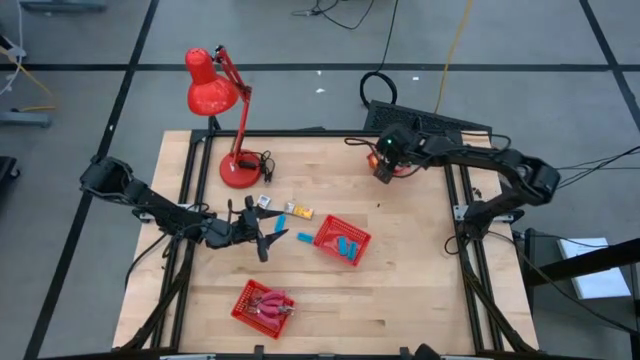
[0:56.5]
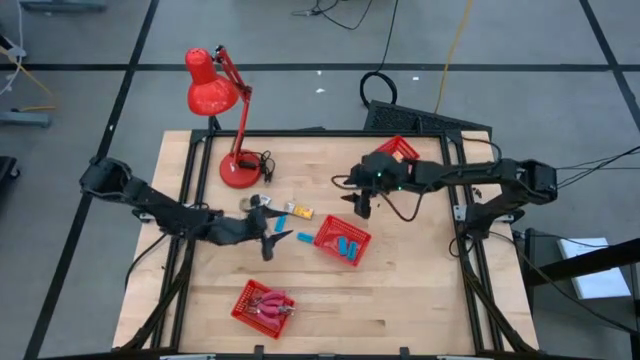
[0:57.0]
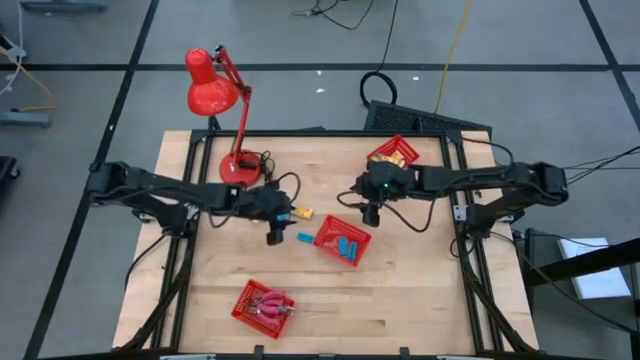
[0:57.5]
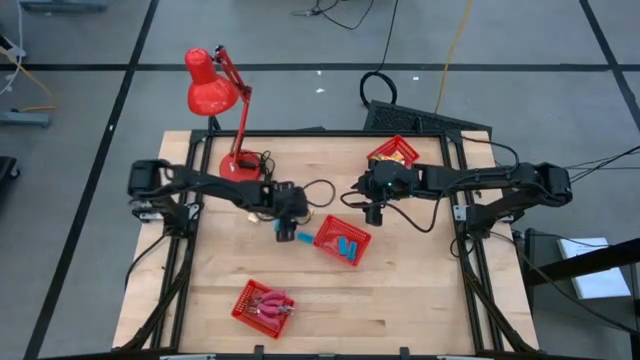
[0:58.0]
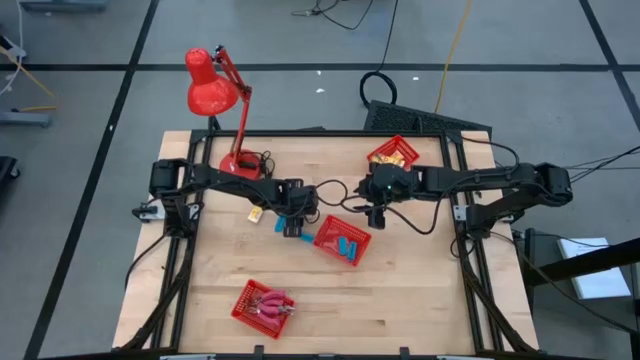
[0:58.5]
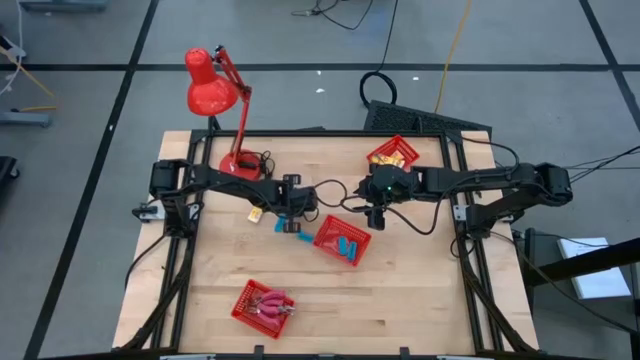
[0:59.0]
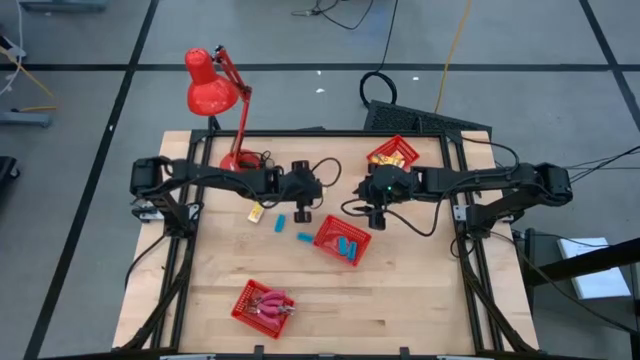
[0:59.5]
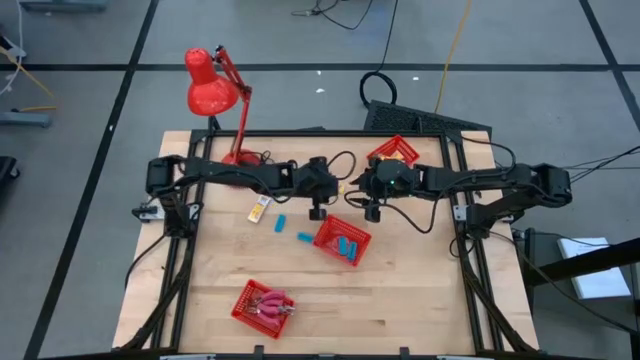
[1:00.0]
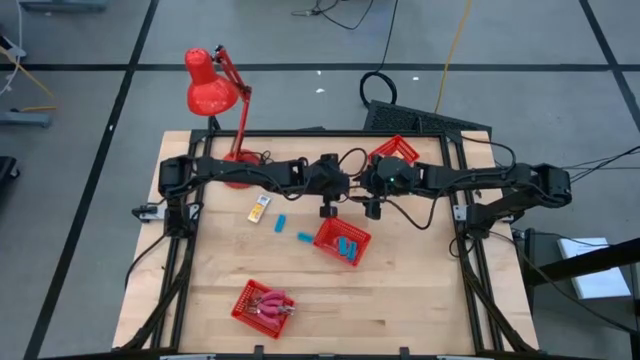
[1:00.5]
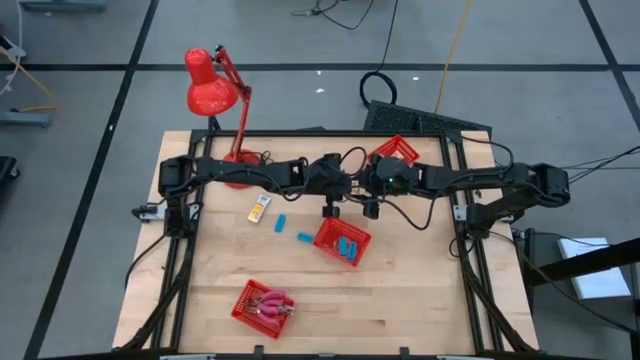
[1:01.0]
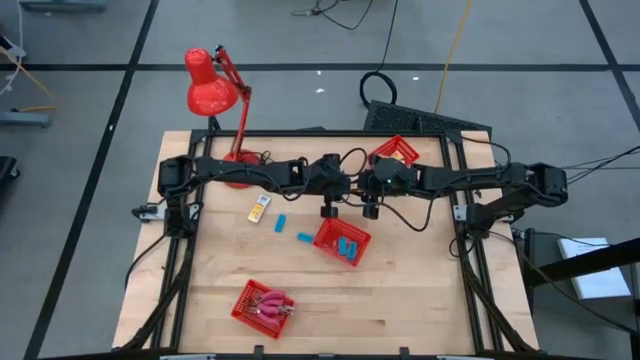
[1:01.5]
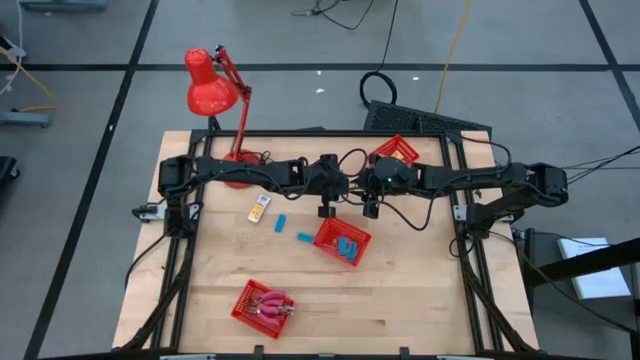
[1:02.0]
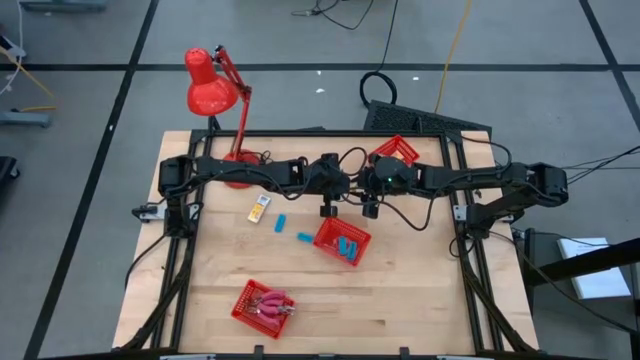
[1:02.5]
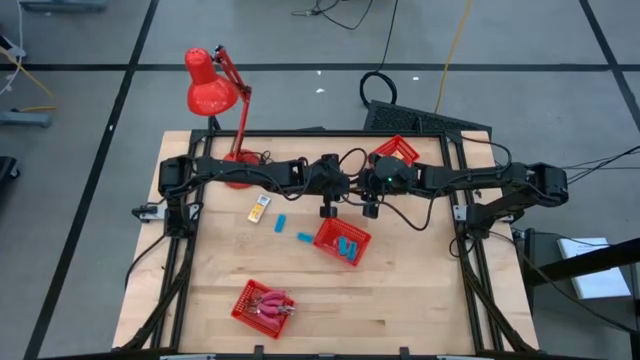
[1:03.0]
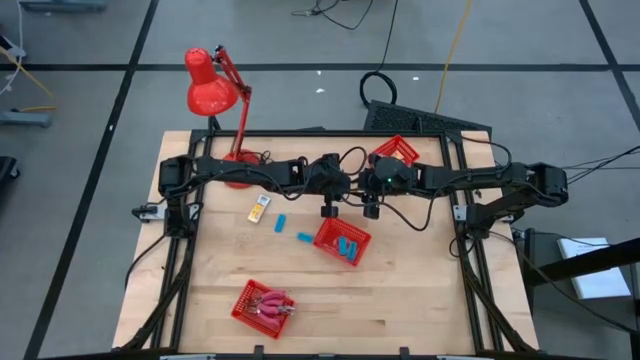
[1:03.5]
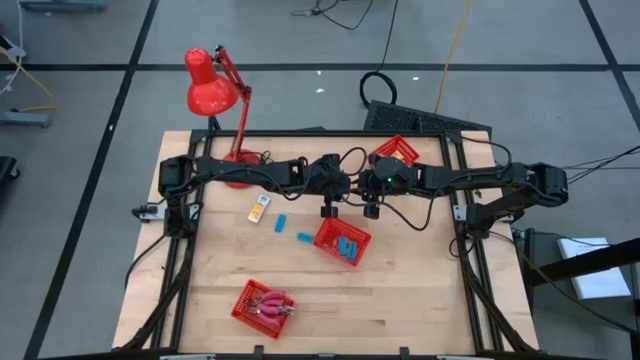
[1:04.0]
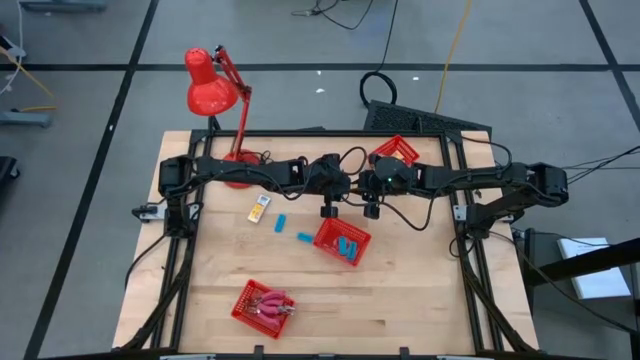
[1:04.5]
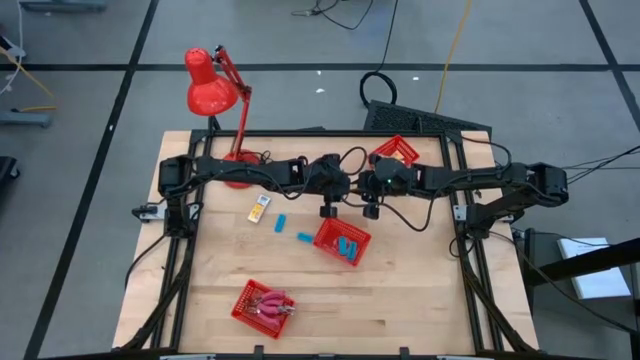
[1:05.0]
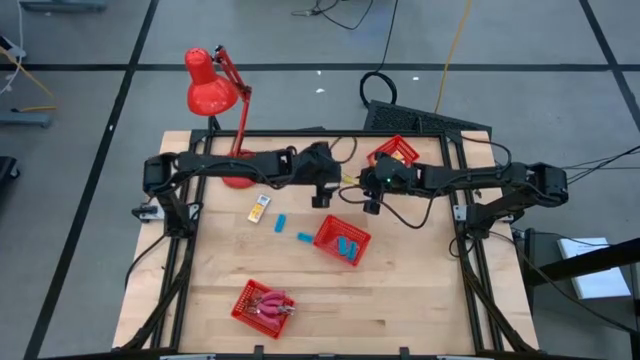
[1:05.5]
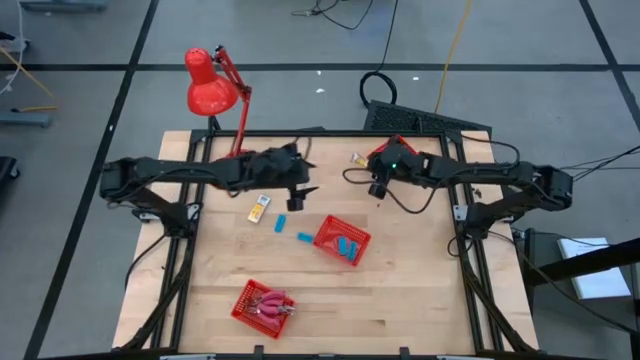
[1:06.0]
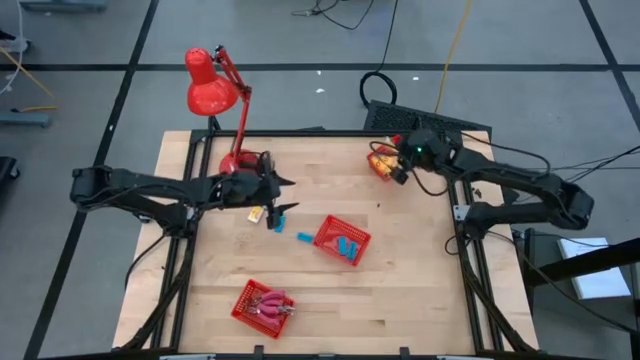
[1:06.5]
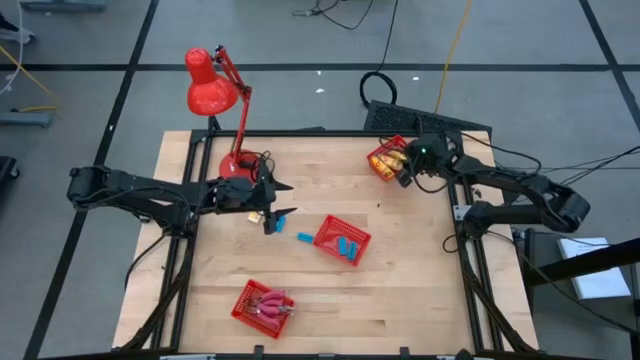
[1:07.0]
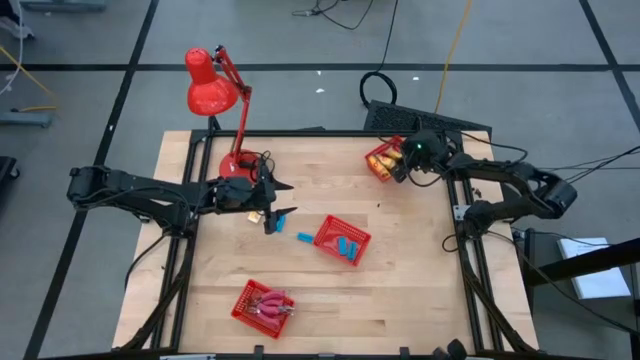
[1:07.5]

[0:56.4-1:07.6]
Task: Pick & Place School Supplies
Put the yellow crayon box into the top red bin

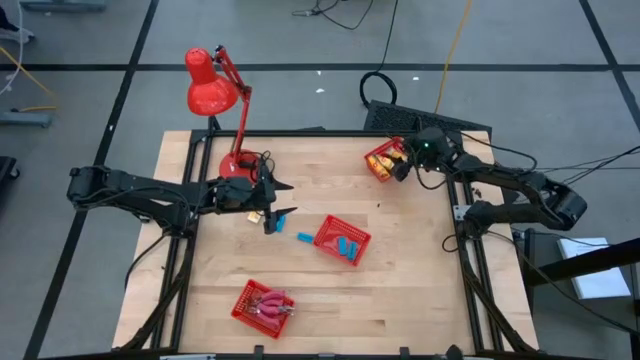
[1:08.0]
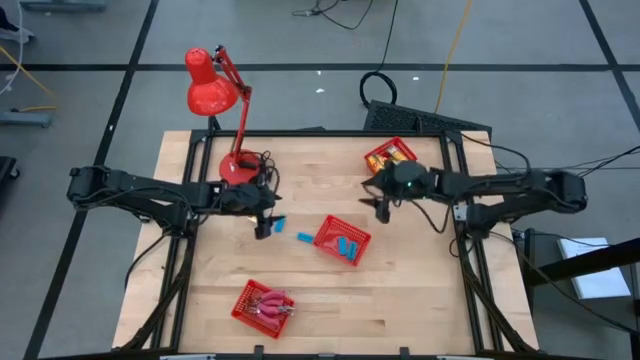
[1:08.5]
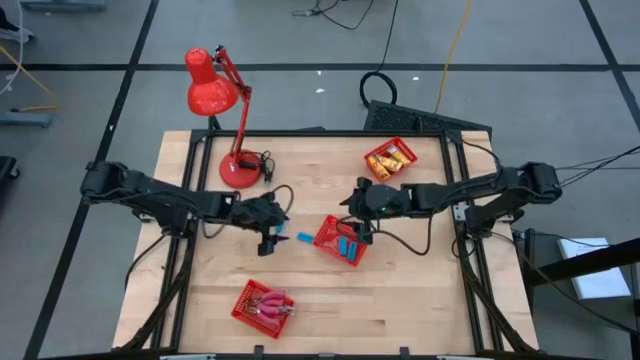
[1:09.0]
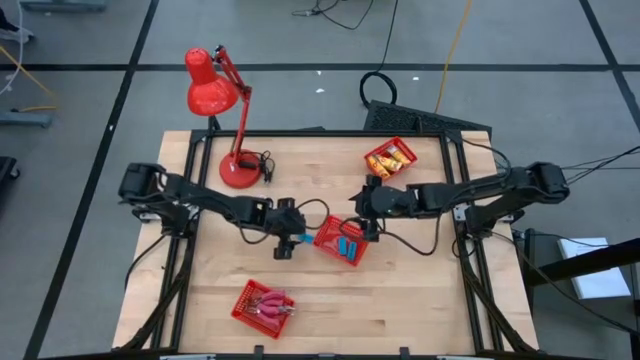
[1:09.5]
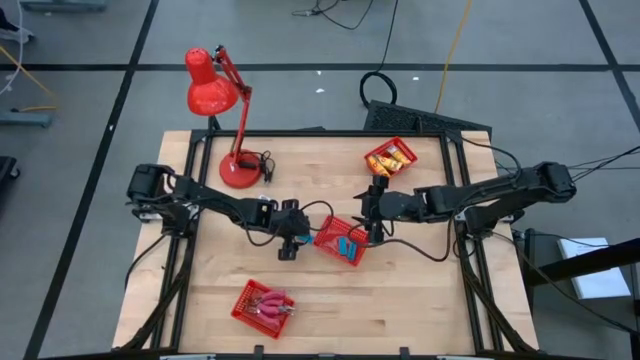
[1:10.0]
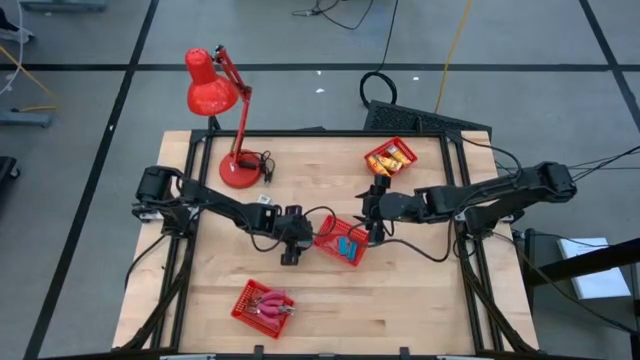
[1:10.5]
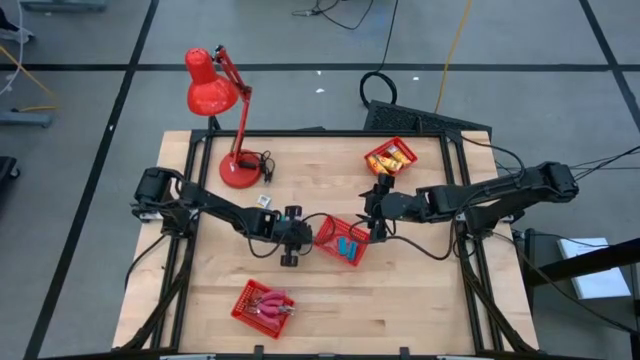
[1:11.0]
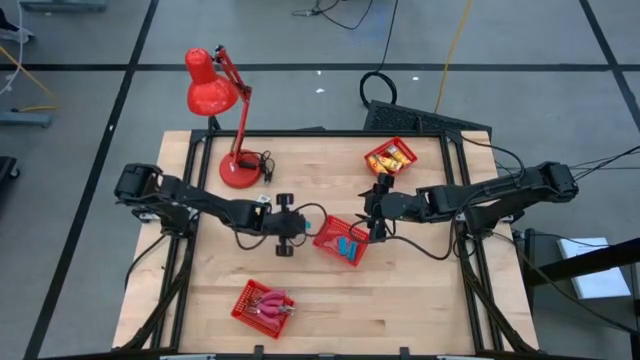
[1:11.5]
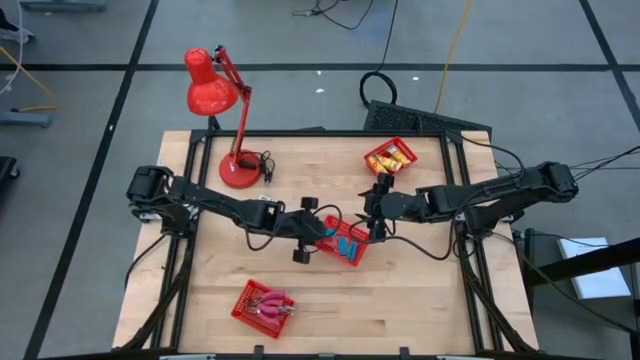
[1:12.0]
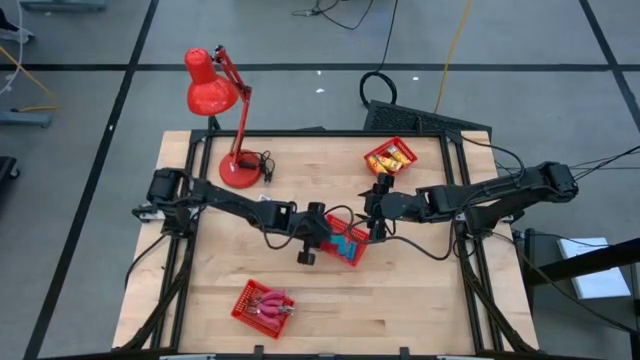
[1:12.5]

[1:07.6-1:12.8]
Put the blue eraser into the middle red bin

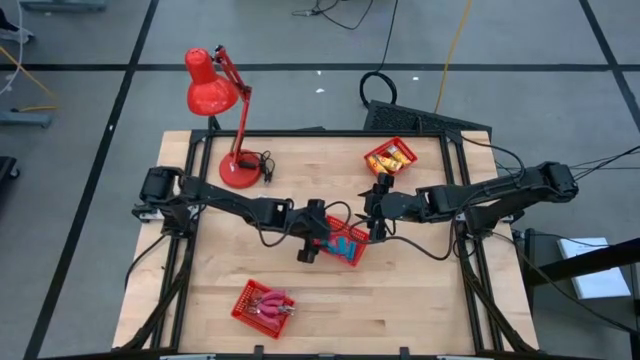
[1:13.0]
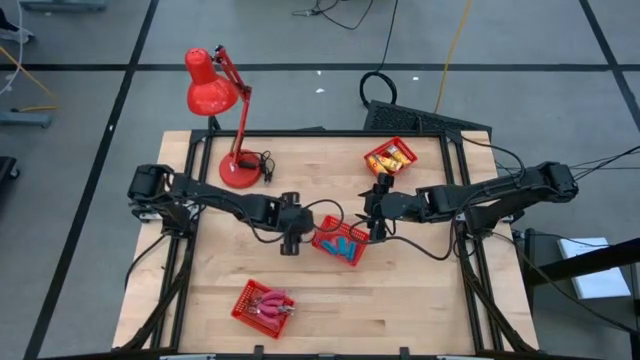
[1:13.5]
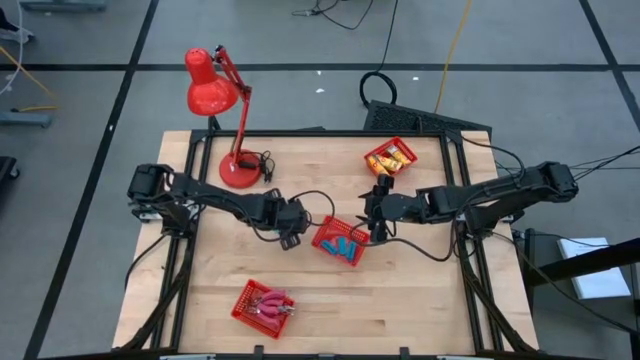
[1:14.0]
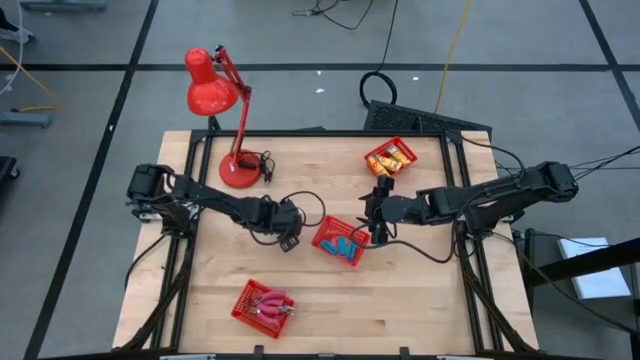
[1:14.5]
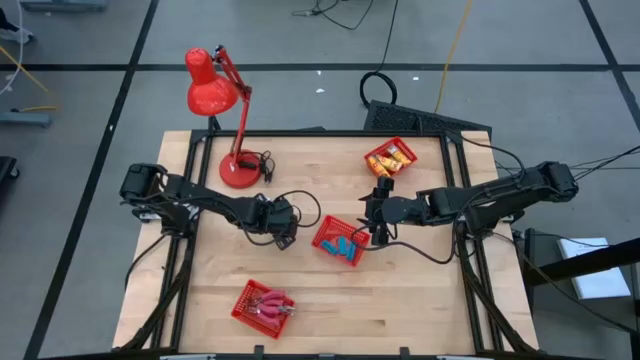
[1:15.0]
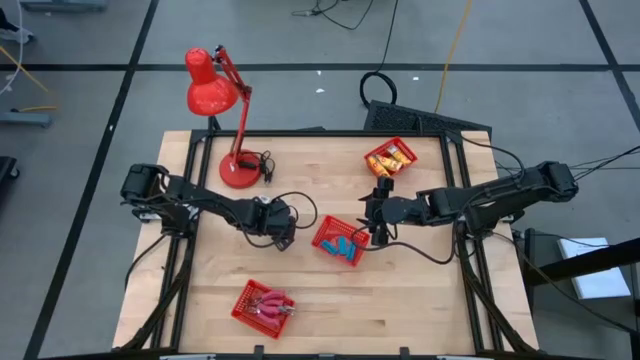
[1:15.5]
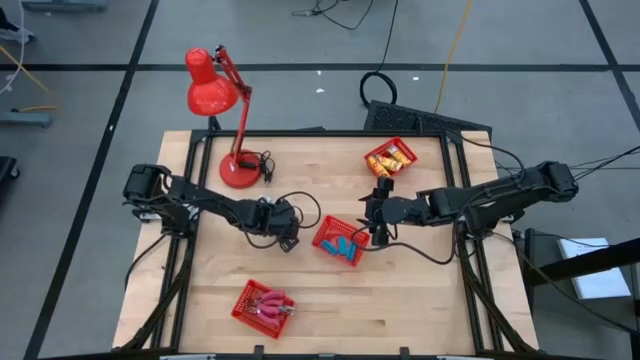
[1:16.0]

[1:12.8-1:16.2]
Put the blue eraser into the middle red bin

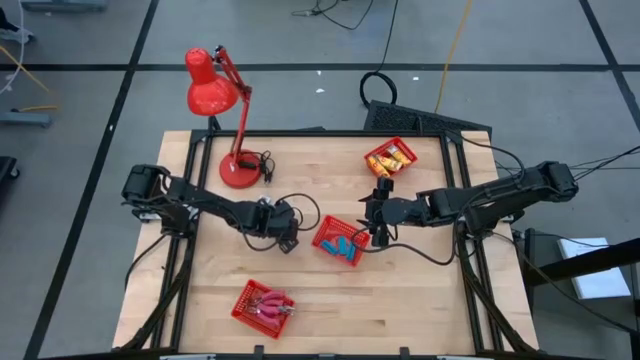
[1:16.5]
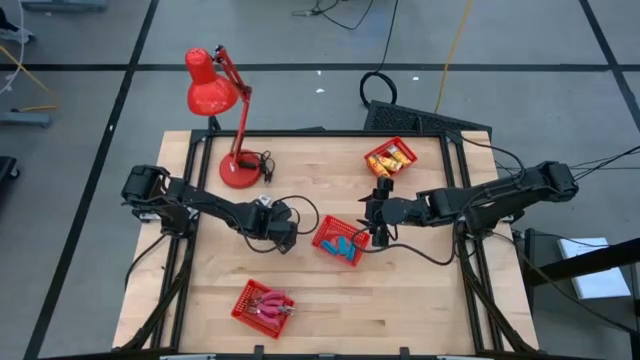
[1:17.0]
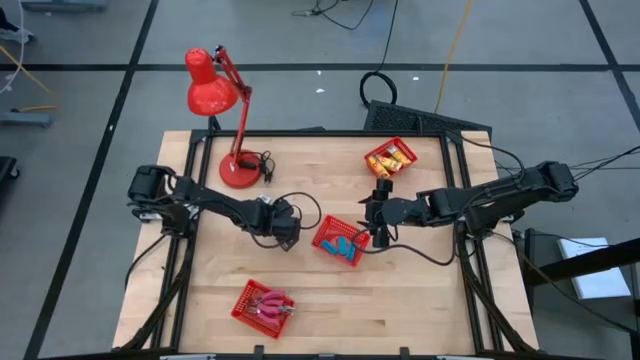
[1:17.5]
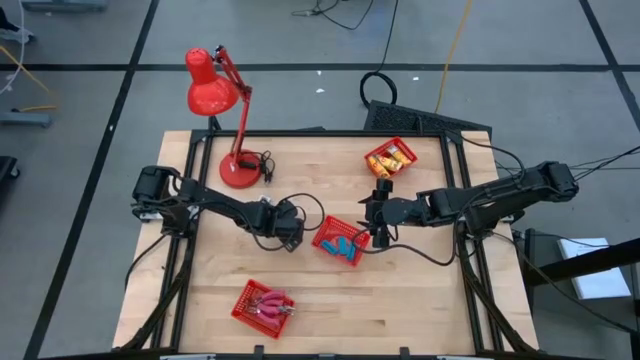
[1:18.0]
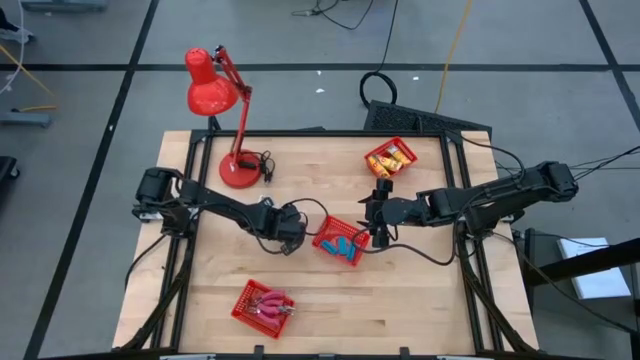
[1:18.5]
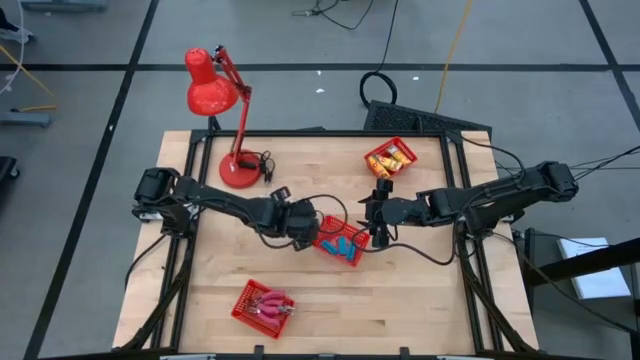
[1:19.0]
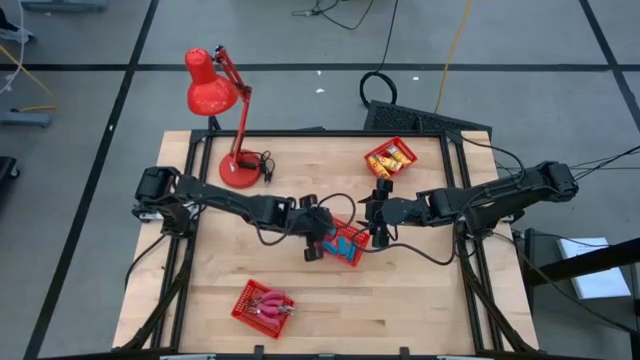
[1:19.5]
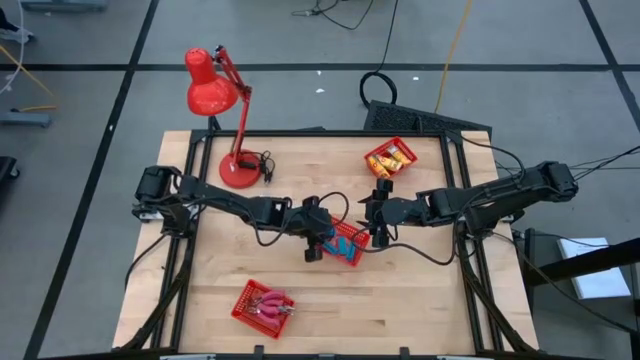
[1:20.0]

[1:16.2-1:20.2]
Put the blue eraser into the middle red bin
